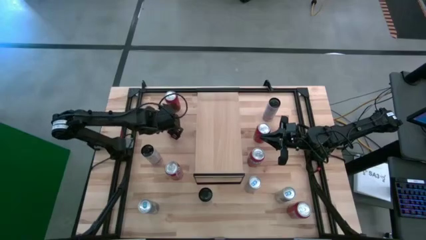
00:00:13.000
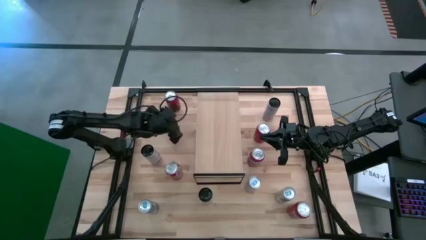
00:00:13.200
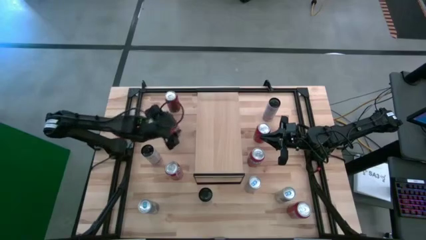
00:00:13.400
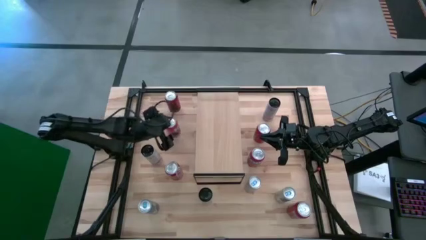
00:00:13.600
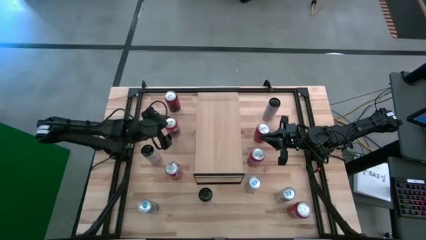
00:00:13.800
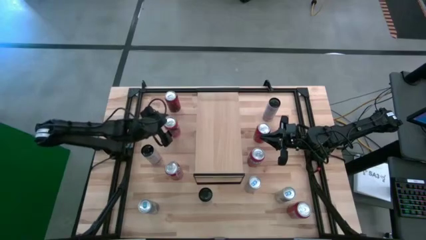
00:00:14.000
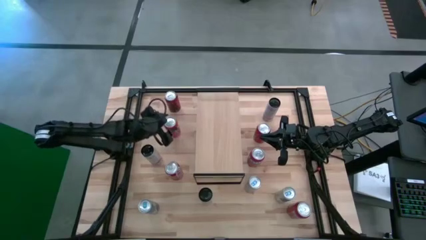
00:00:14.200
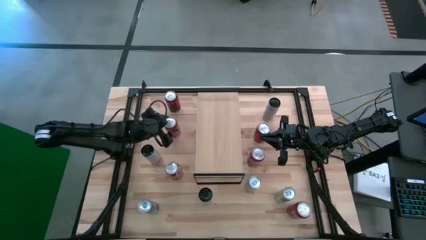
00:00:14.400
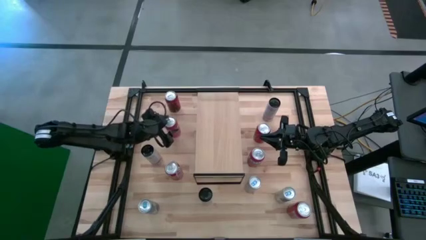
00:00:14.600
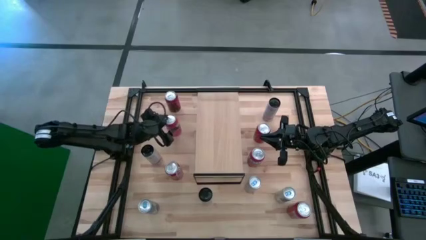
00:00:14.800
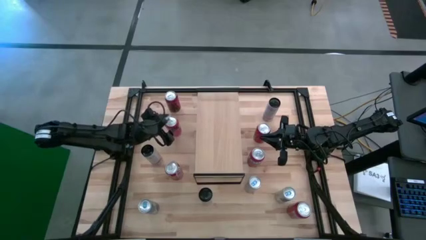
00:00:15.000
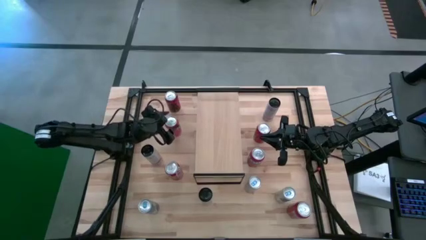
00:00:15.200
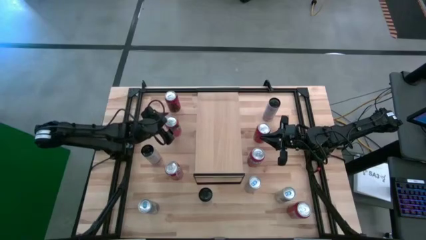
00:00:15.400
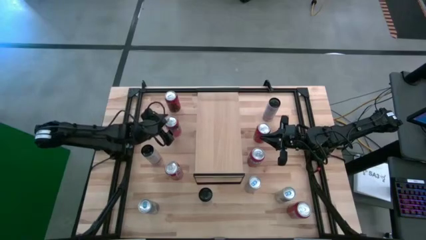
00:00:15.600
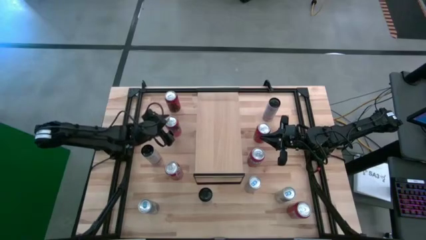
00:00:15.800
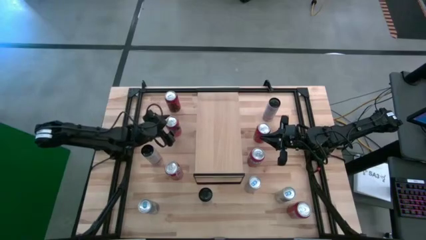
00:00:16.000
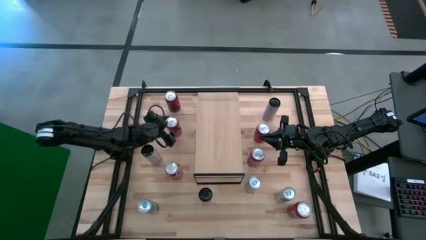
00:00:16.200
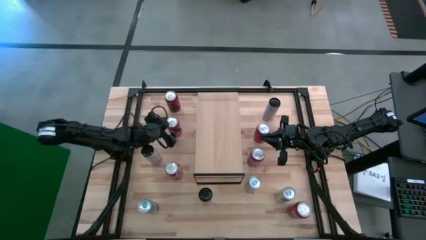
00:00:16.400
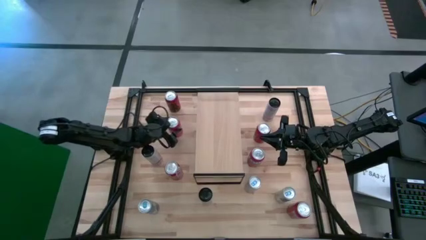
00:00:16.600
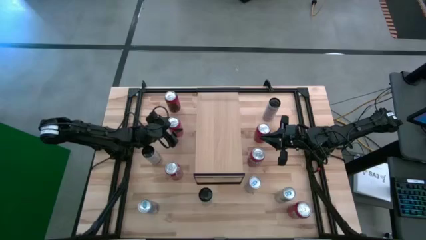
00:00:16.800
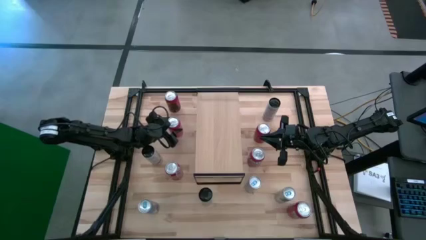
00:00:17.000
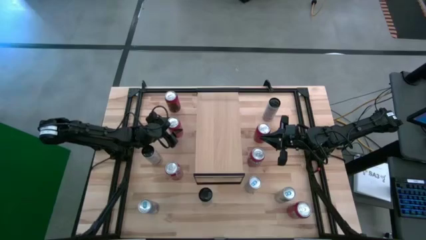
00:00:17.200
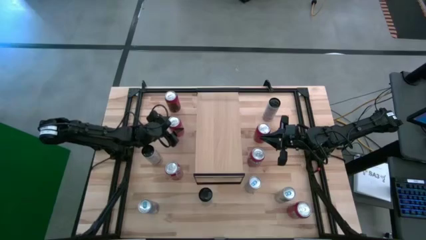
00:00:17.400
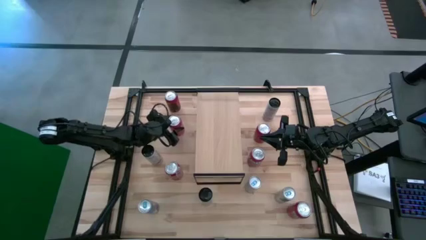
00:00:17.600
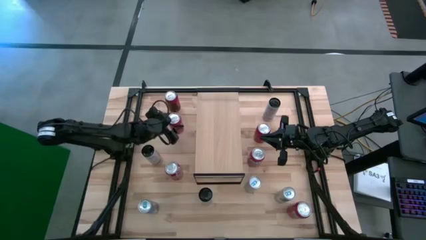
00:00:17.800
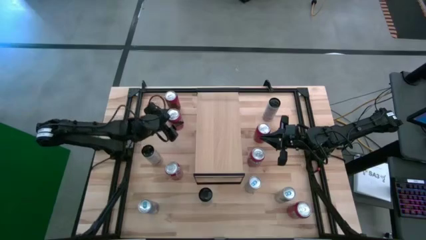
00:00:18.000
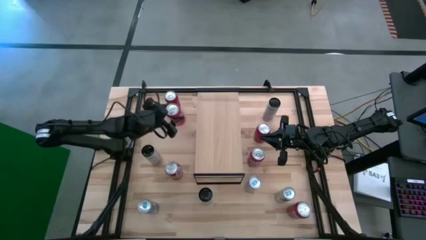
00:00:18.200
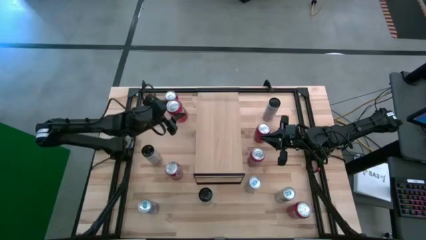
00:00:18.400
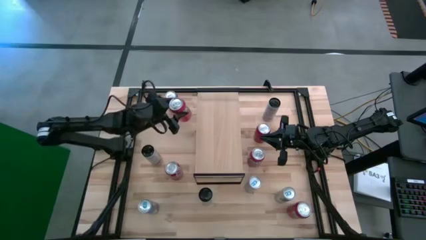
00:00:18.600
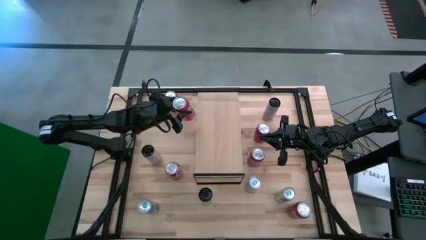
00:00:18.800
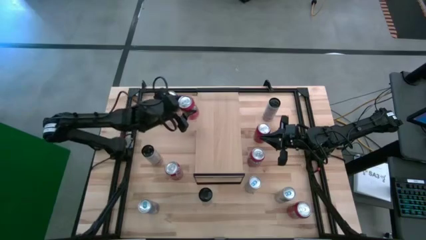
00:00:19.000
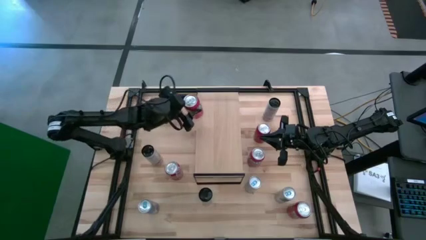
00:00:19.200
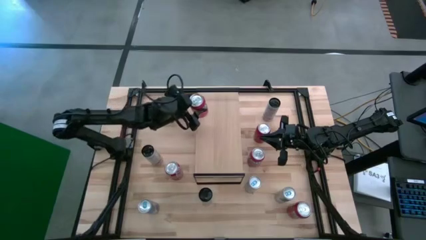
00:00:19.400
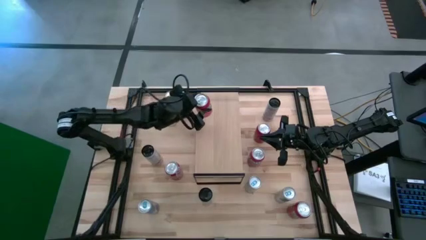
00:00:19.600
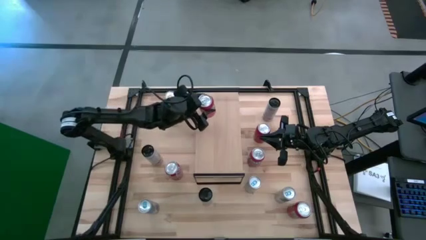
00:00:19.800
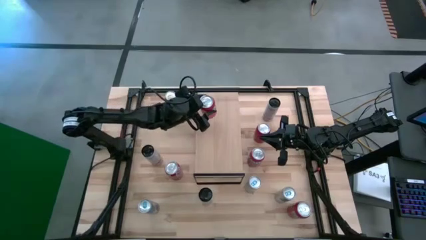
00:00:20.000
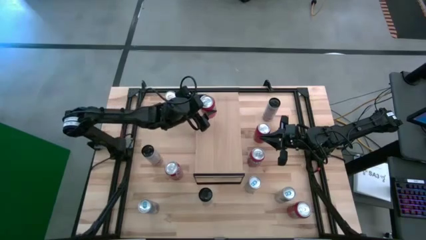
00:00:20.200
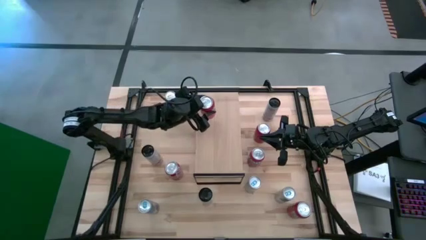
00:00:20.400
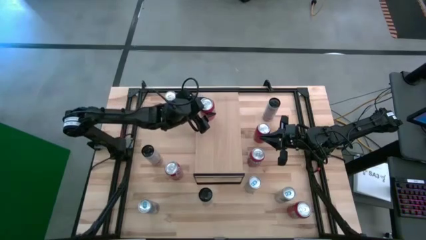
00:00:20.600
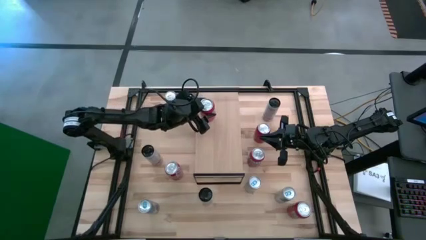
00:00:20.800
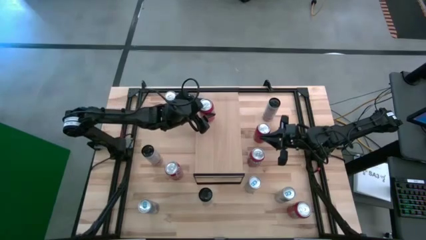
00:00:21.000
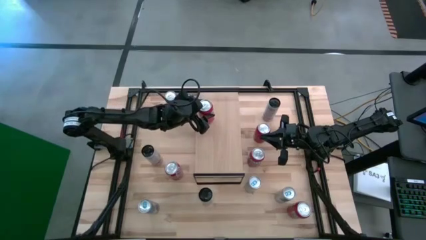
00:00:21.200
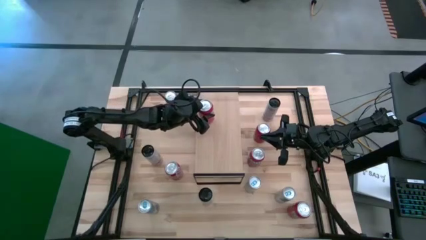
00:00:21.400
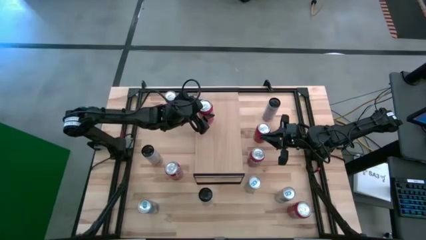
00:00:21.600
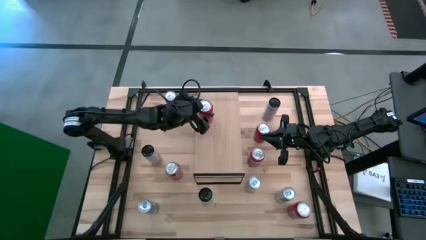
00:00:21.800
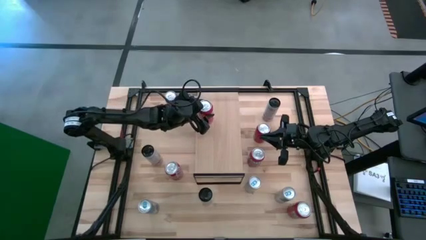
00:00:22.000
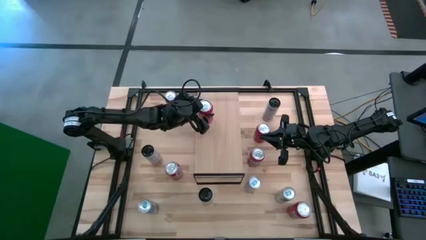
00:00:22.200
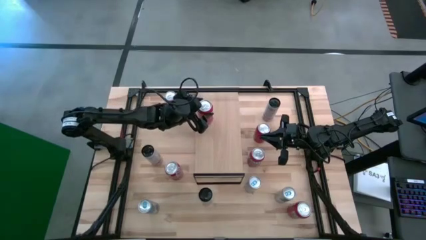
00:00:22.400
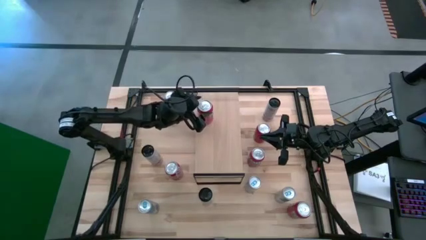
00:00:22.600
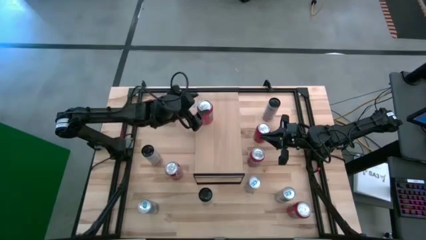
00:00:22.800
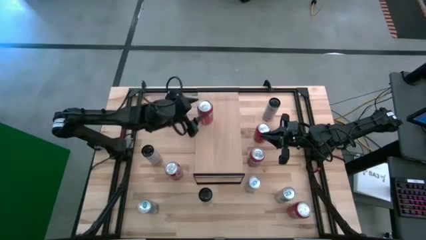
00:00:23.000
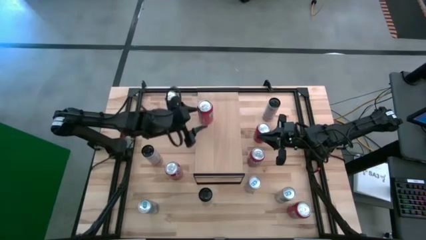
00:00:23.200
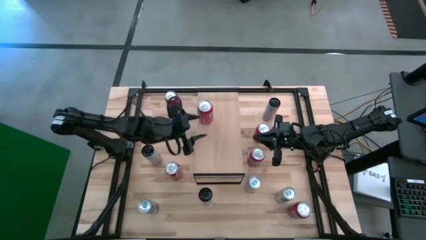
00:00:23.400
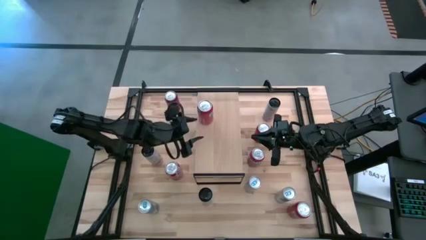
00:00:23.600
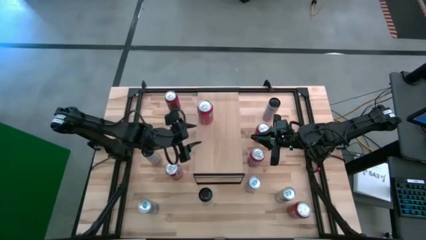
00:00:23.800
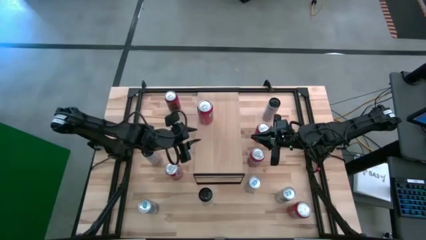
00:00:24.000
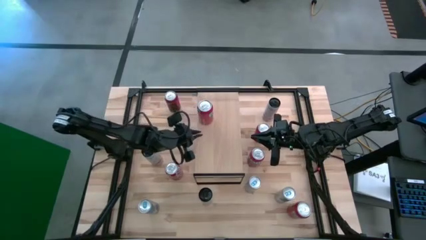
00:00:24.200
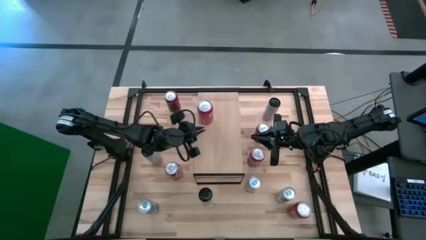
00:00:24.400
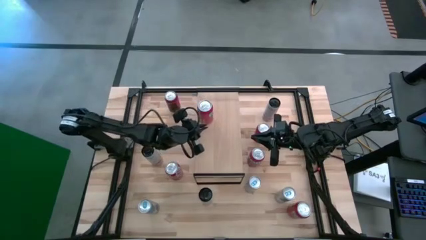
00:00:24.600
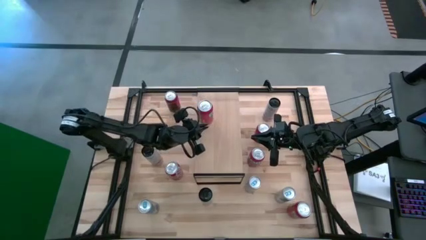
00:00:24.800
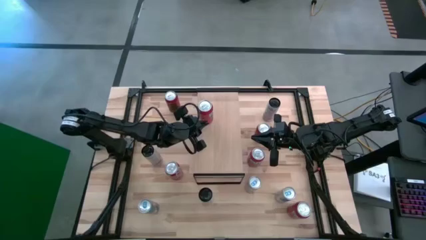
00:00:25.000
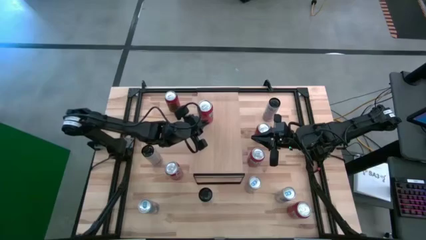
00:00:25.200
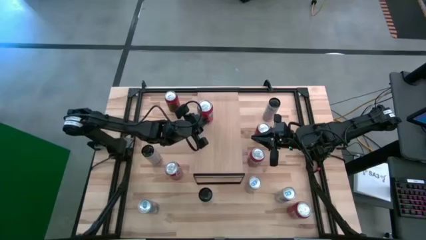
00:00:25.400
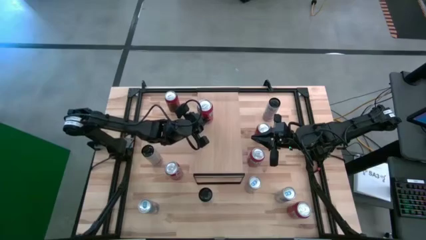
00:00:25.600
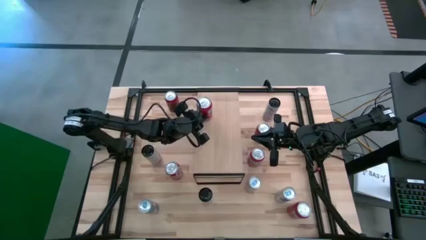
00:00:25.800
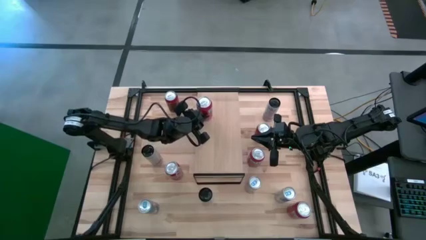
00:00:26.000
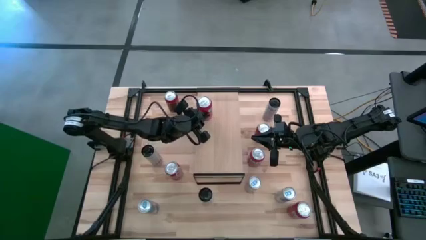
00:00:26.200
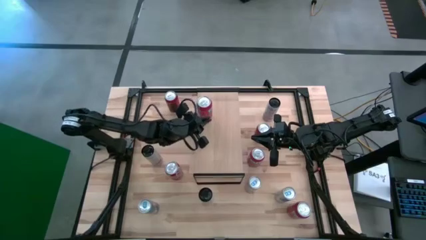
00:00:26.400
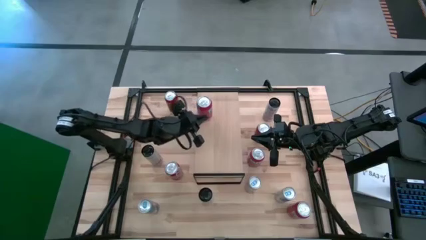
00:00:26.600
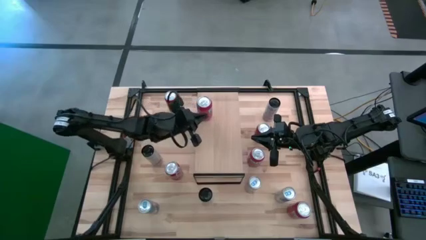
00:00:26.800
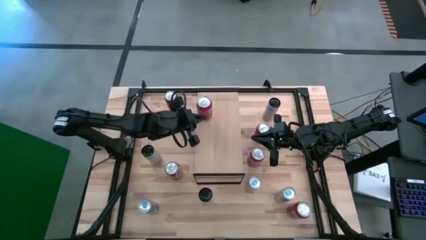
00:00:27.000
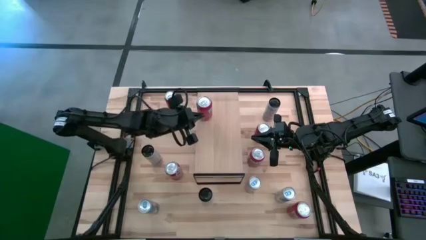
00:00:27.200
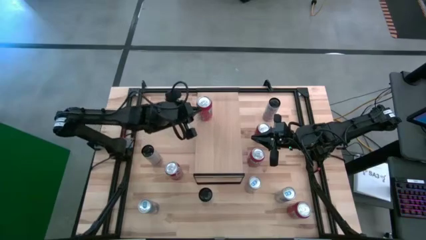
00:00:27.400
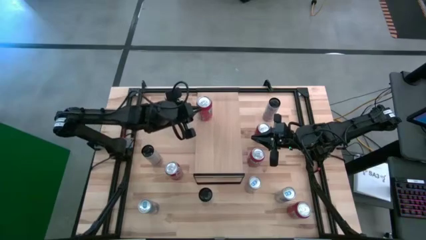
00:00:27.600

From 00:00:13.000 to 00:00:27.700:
Task: Place canned beverage on shelf
Put the top left orange soda can on the shelf
